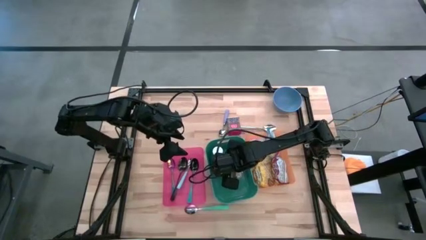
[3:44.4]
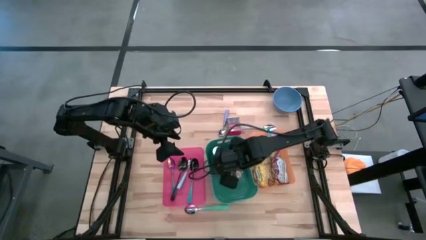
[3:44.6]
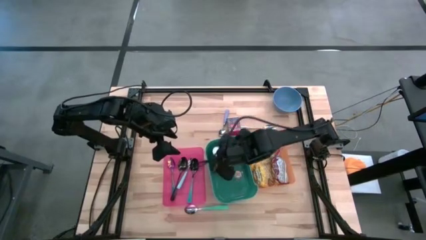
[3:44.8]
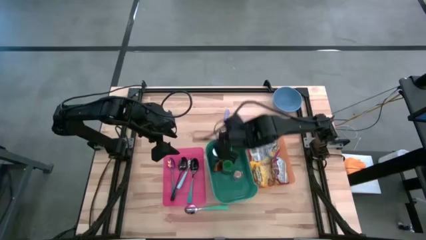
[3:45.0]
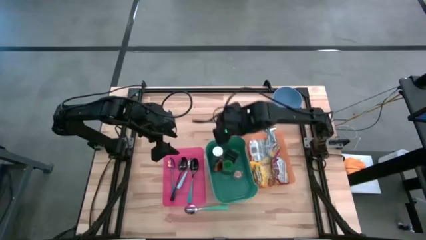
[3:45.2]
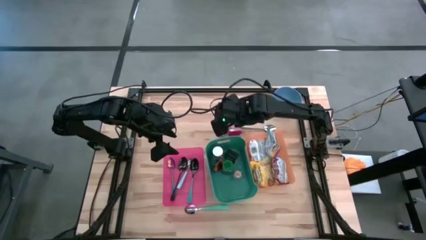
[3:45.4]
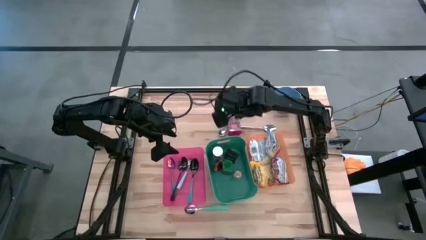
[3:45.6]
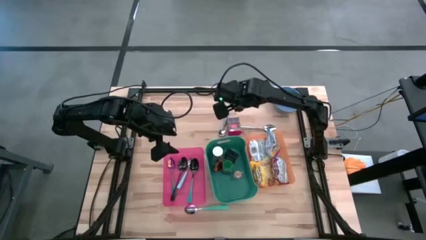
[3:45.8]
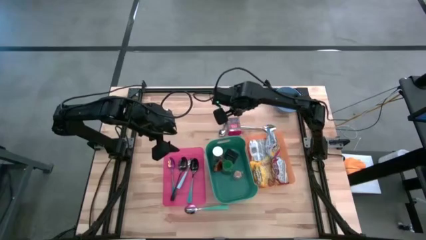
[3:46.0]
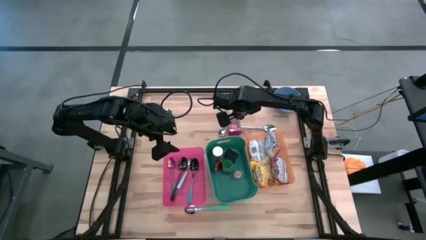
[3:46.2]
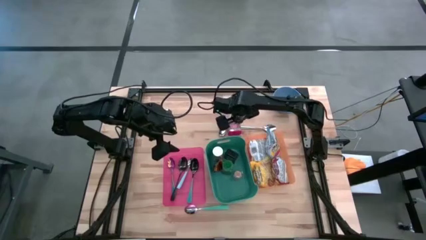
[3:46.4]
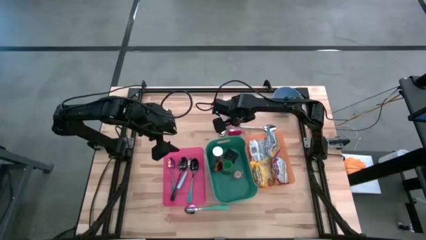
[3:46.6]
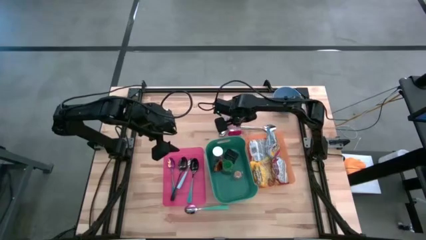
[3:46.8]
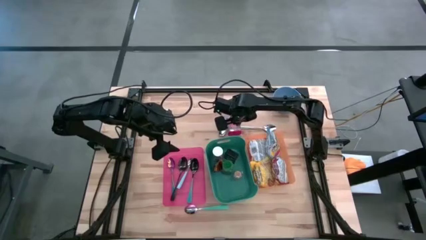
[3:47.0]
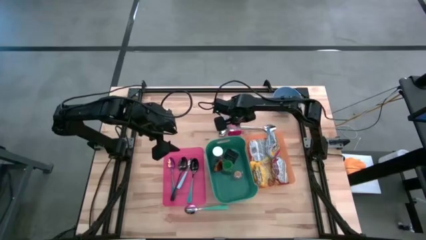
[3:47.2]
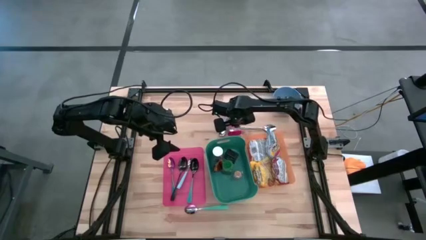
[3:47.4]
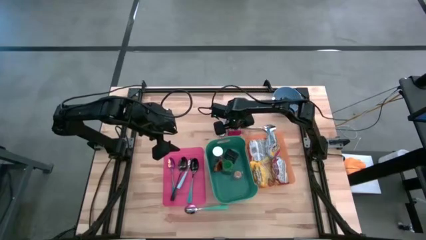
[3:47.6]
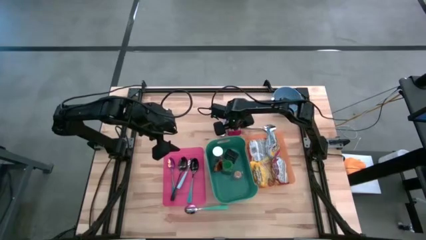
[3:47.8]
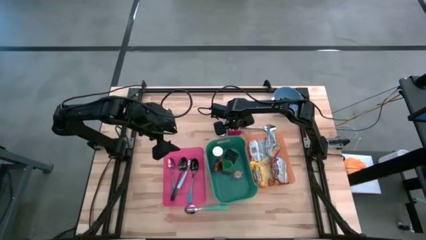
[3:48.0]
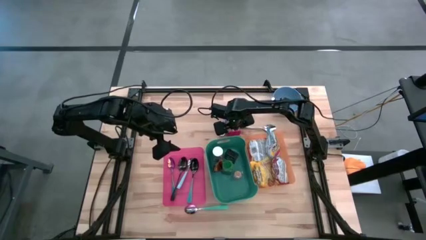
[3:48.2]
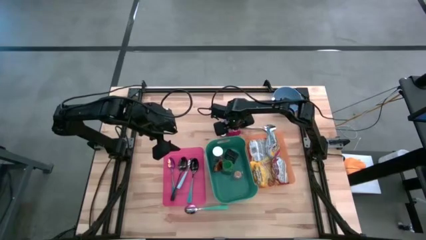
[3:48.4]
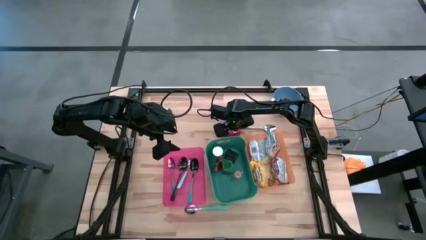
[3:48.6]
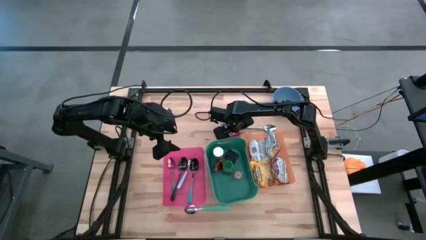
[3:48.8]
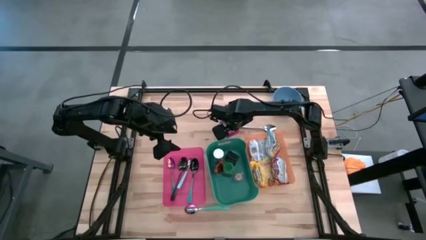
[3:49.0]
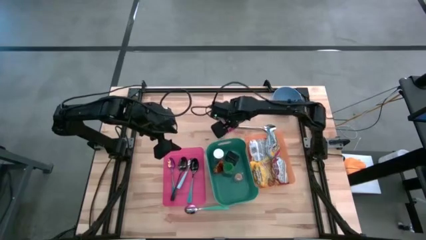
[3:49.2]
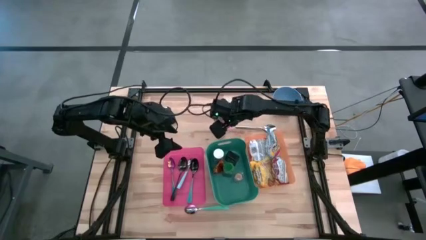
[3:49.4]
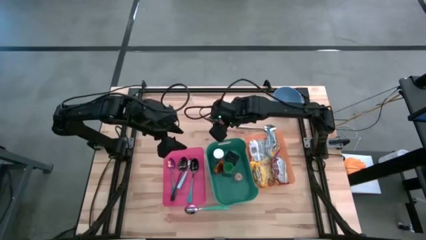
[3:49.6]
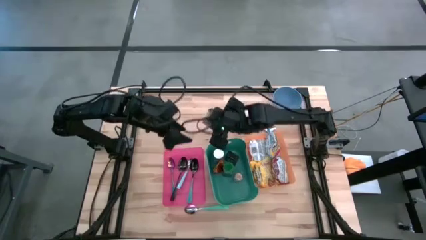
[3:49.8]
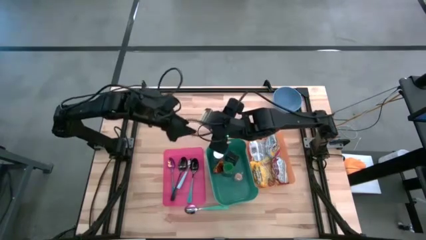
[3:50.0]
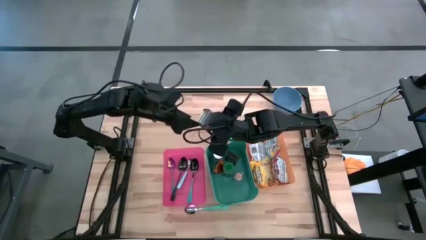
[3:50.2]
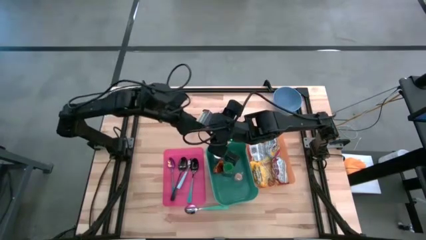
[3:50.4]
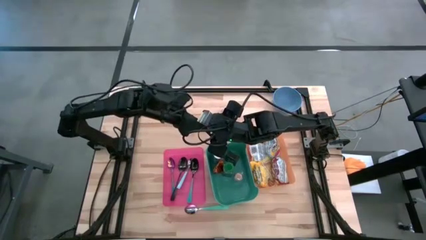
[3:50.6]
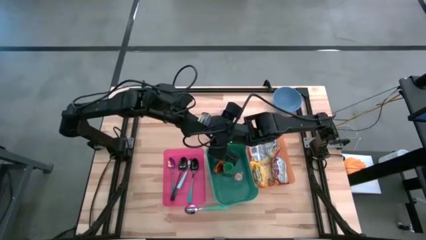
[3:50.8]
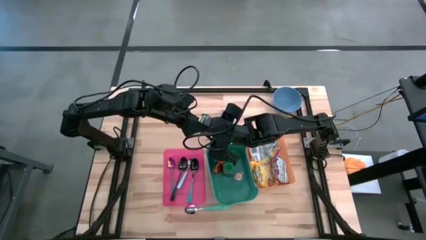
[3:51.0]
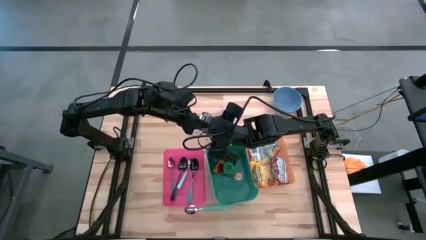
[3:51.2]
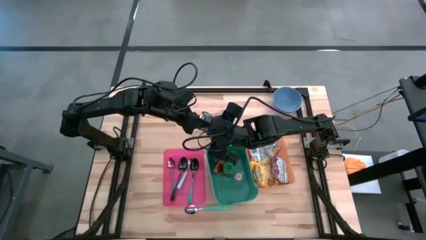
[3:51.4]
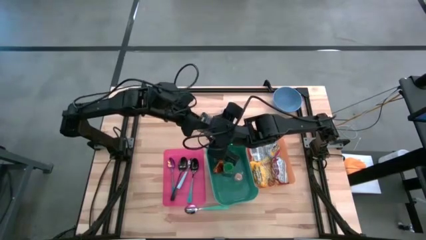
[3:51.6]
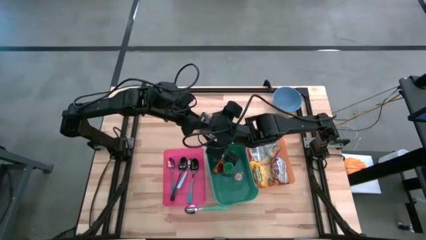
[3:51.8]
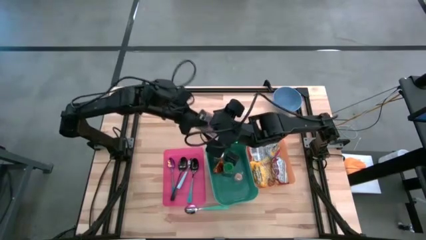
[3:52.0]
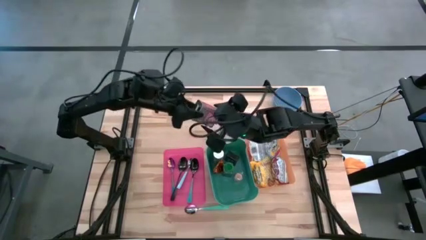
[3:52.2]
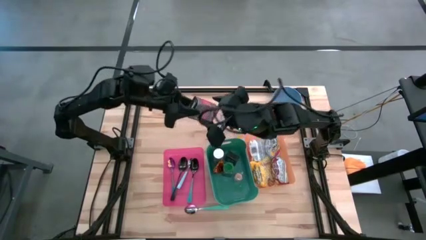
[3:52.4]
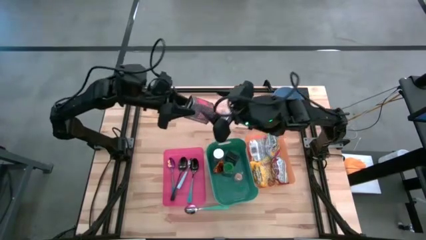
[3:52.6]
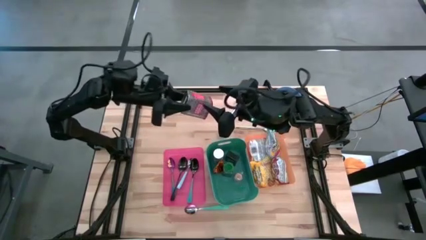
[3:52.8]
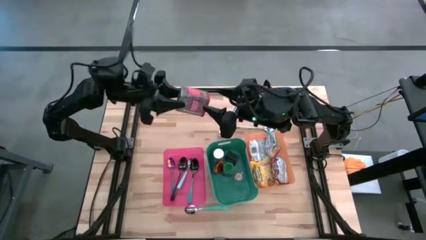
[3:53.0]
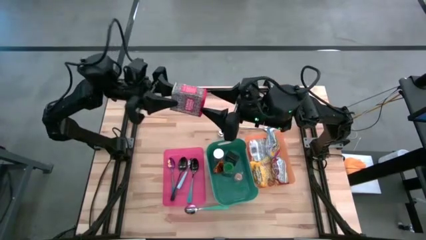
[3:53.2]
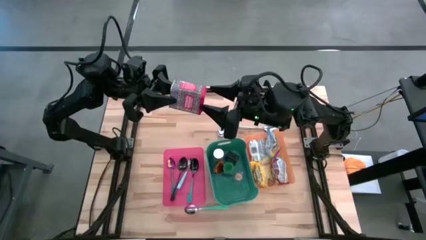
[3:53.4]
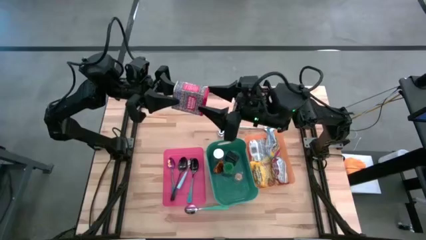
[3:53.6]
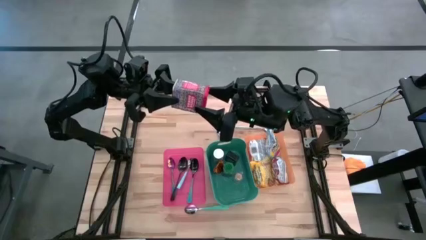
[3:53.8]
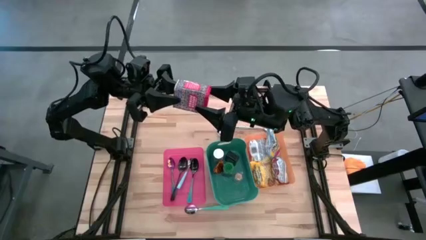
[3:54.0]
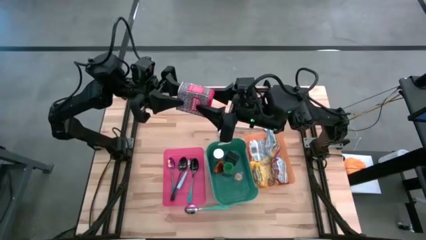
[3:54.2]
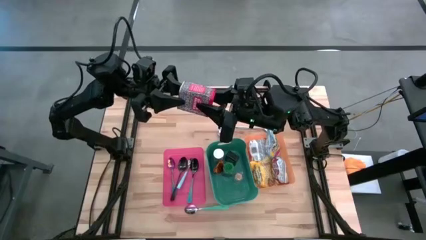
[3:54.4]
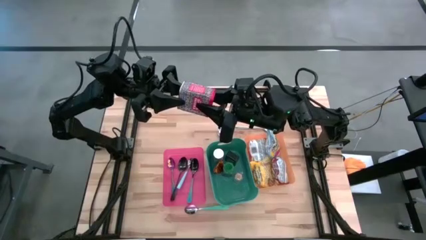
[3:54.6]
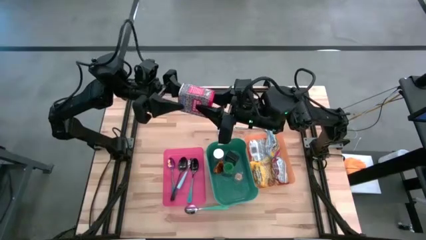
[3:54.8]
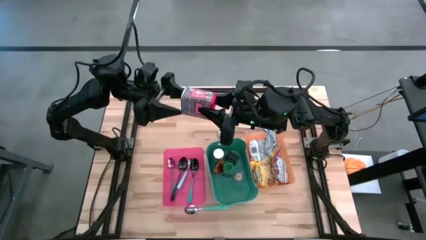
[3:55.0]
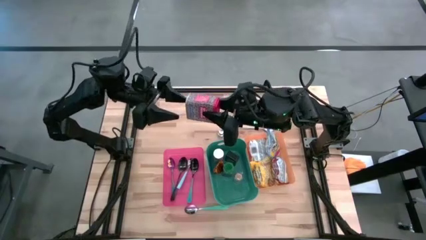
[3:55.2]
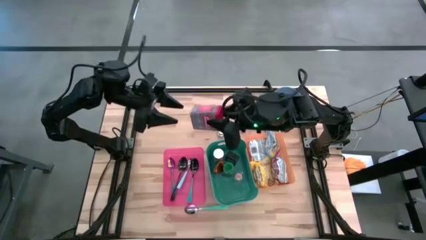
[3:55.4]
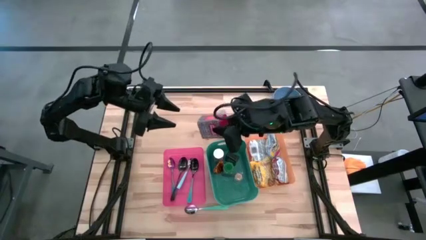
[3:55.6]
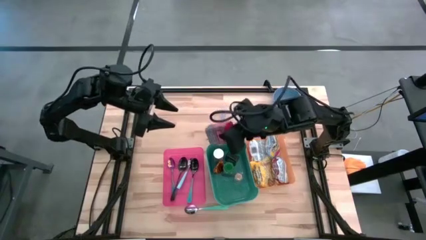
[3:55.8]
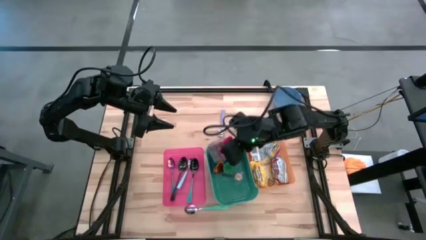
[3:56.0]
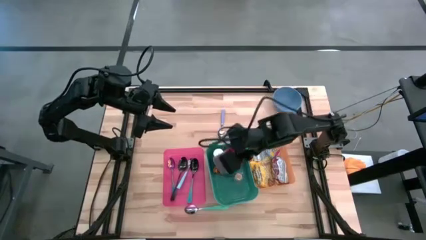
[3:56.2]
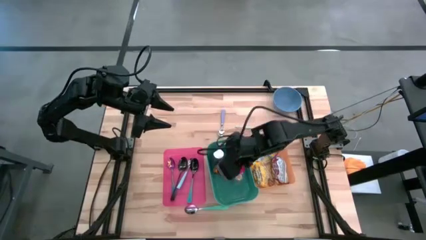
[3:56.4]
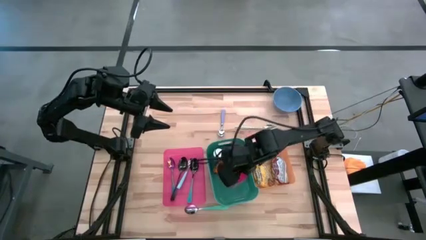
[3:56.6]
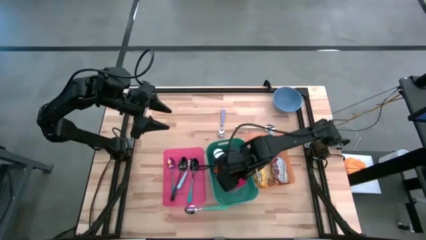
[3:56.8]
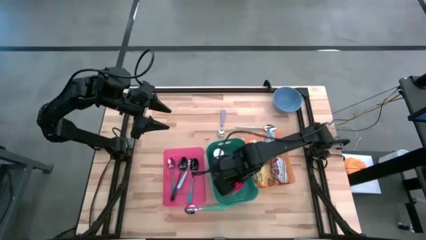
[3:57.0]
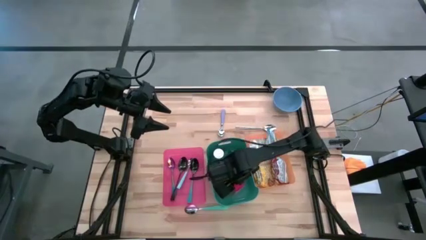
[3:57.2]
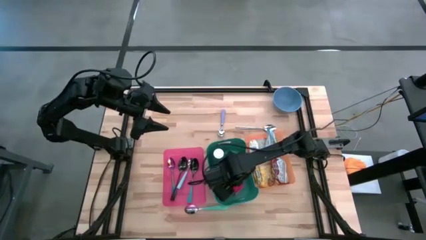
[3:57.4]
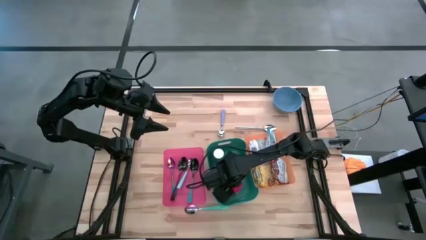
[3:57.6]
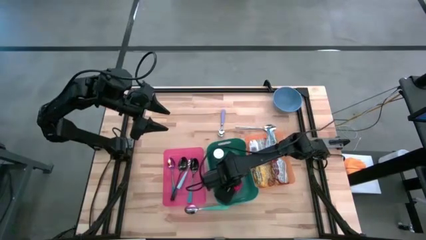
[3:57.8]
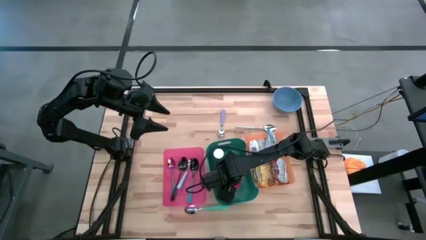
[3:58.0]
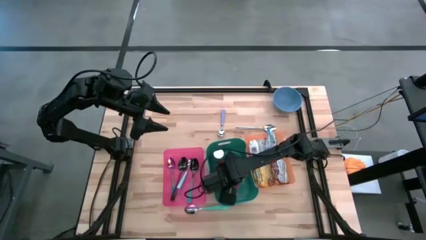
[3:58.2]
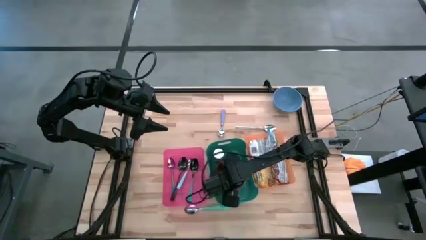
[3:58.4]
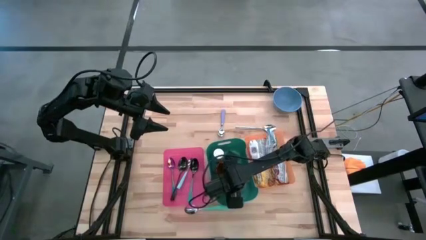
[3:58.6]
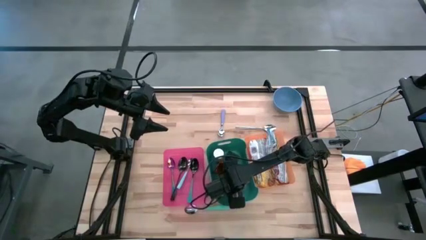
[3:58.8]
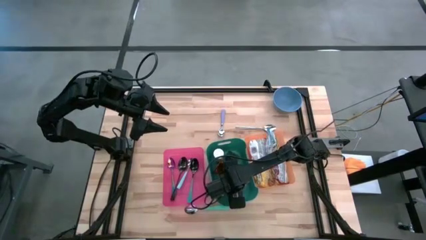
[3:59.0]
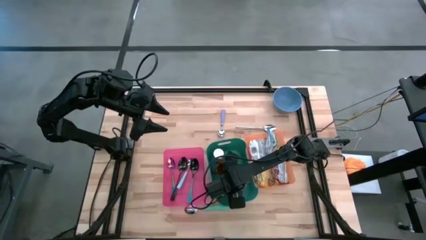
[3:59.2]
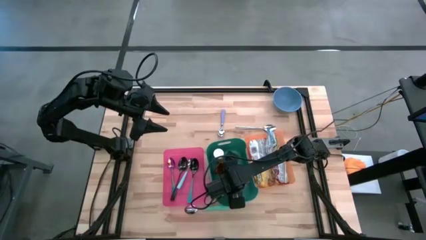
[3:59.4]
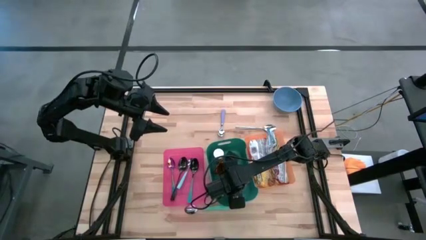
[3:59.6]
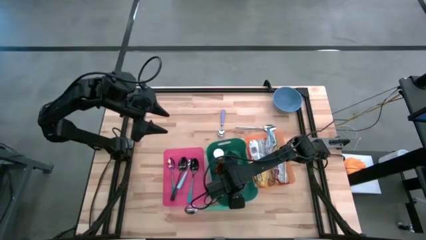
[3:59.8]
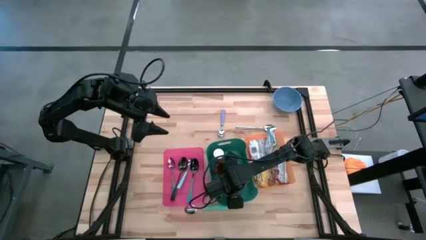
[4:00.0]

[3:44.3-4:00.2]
Put the red seasoning can into the green bin
